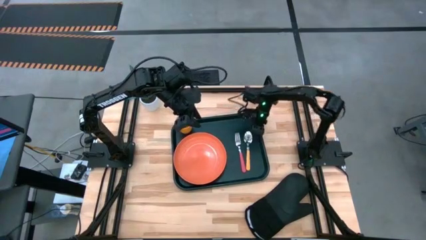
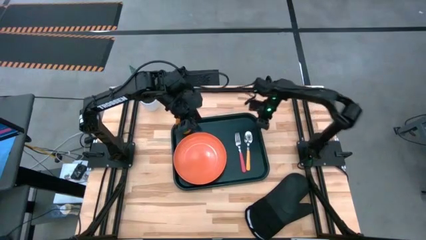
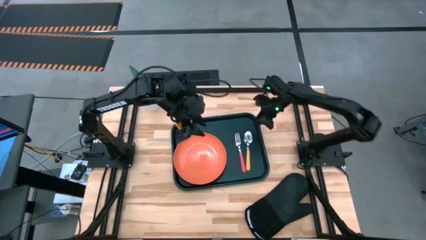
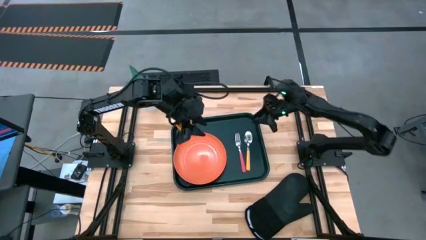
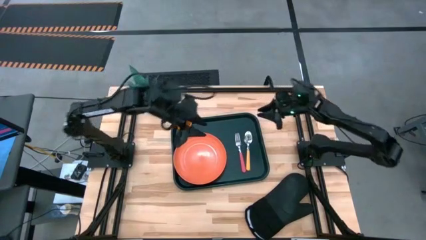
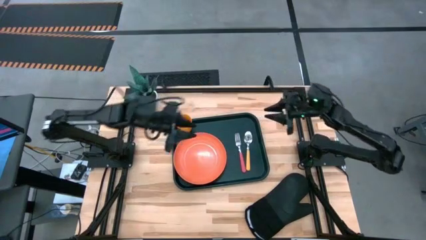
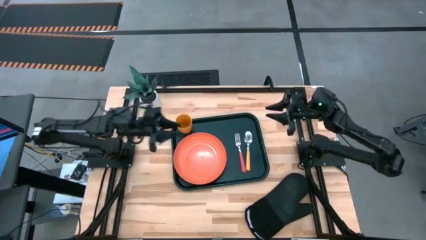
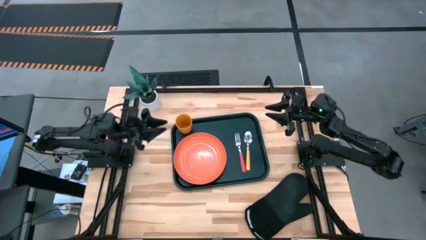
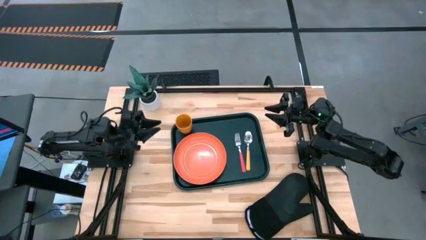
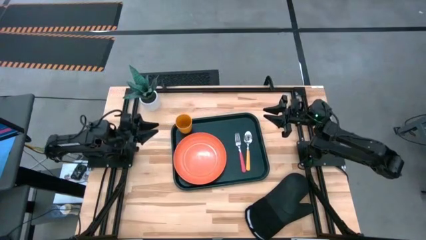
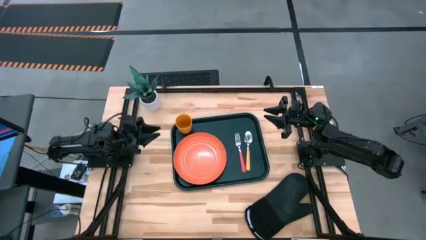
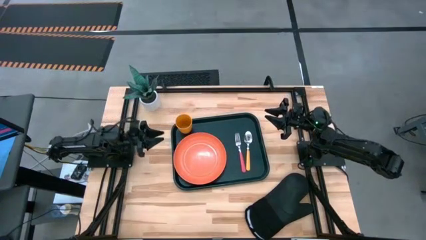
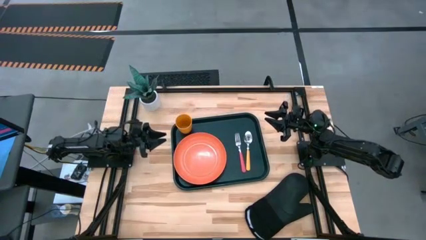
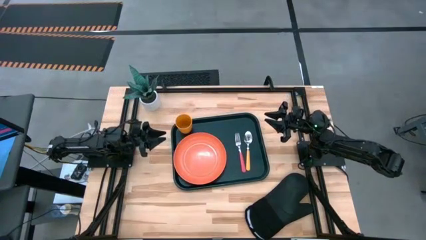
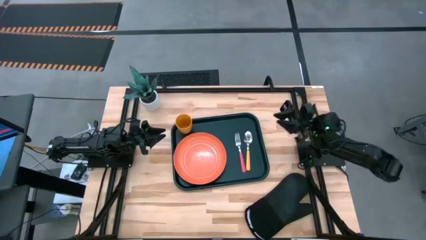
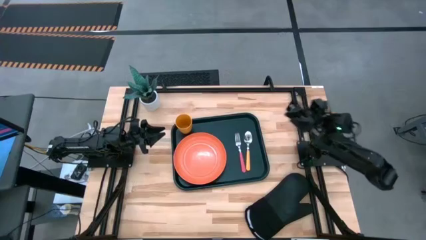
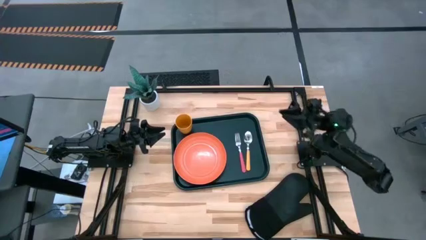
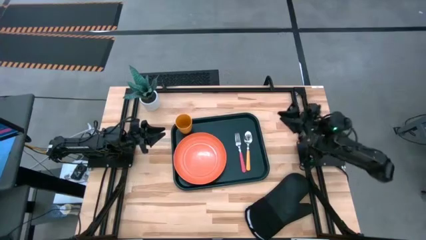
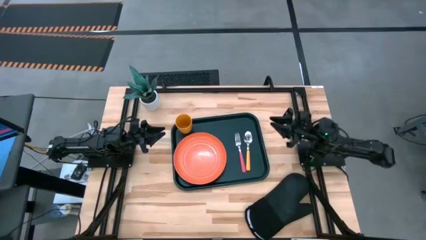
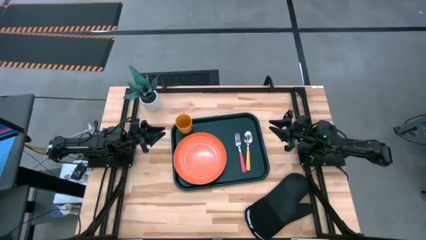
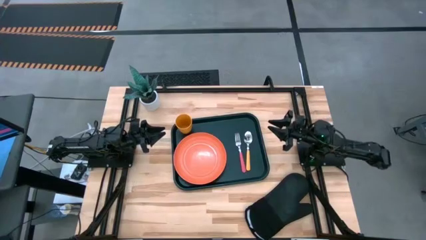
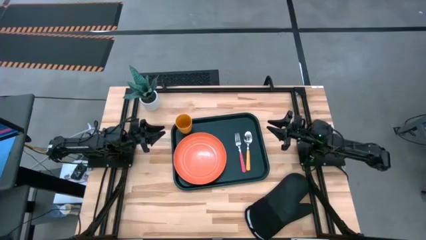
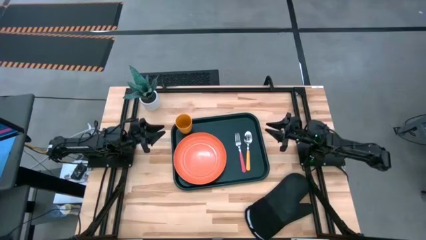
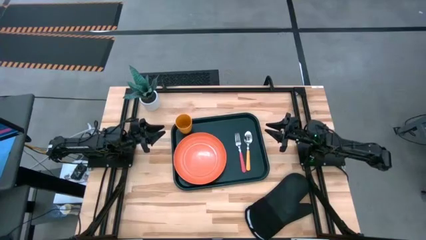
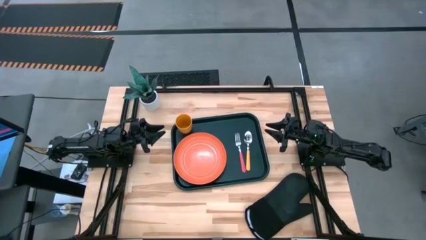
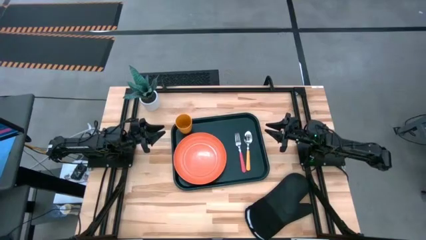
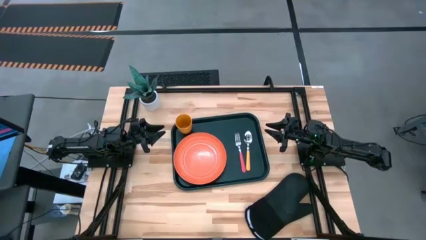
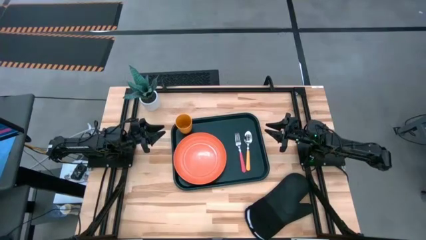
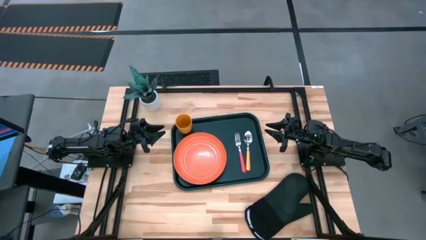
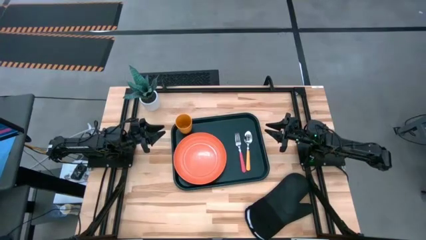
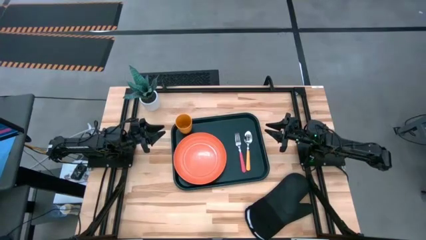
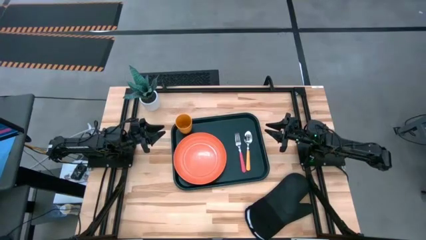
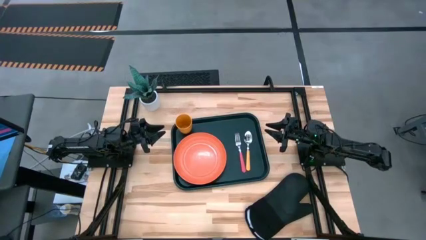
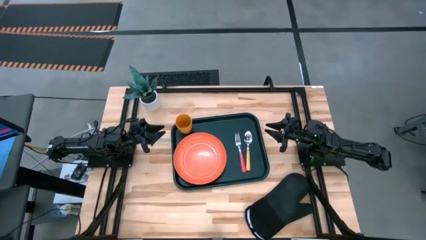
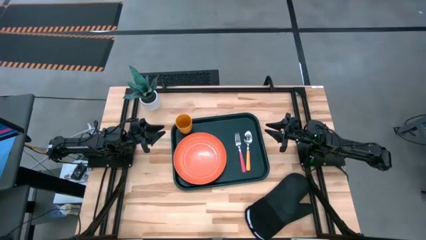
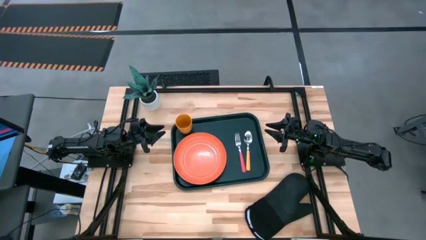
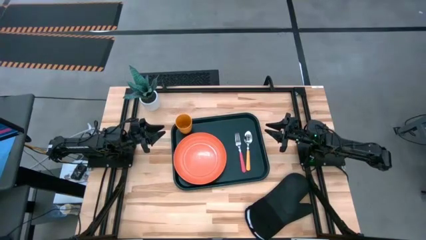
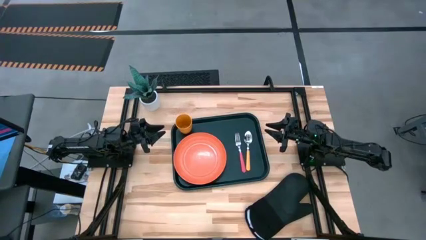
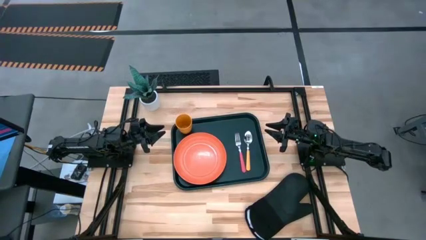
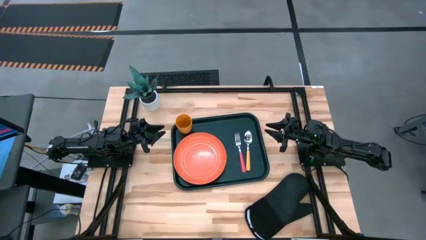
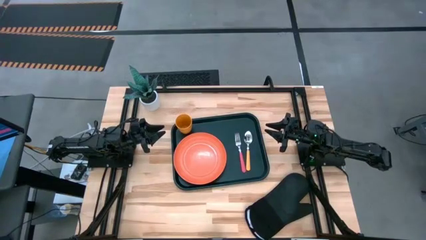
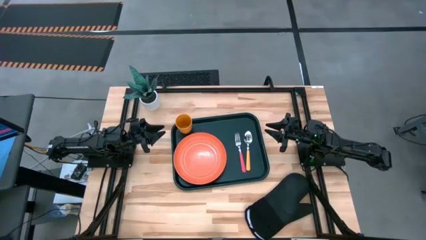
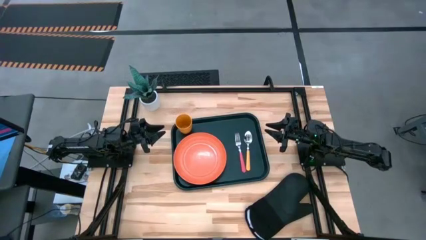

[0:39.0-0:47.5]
Task: Pick and place plate/cup/fork/spoon on tray
Return to Home Position

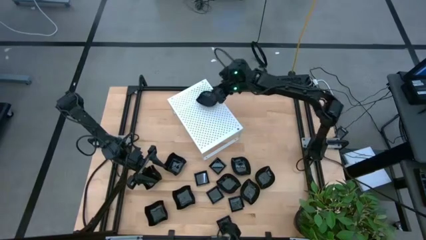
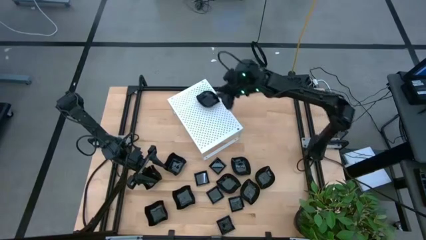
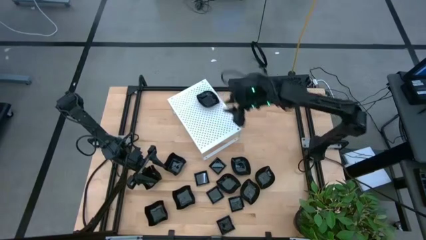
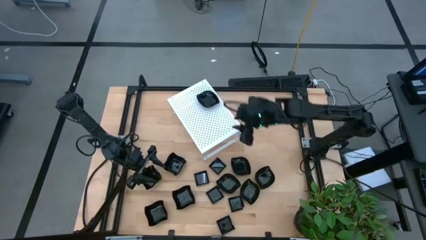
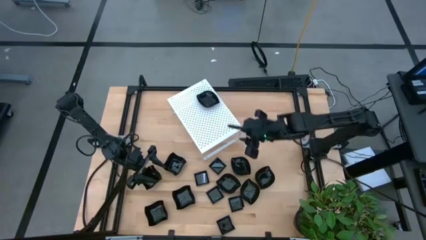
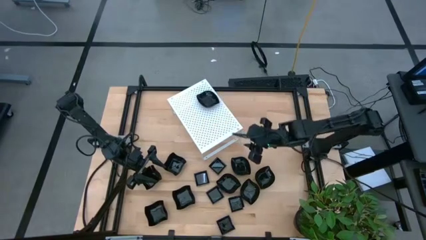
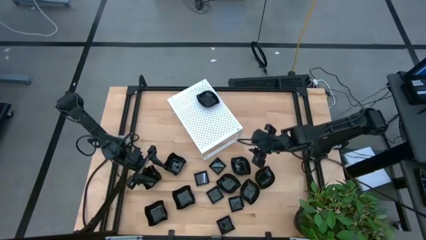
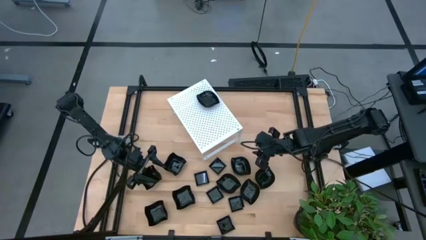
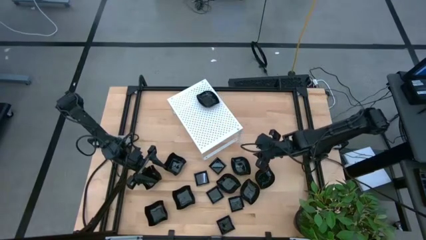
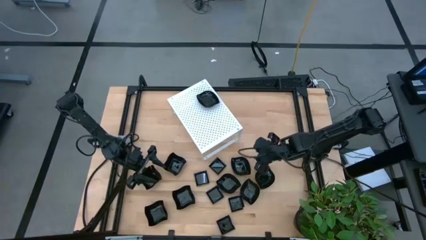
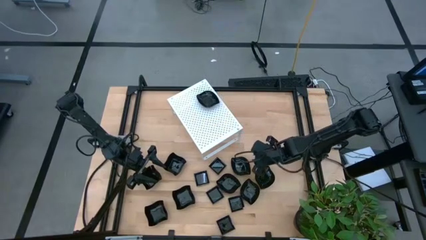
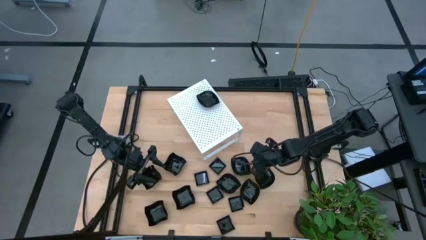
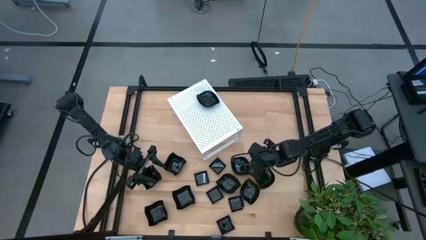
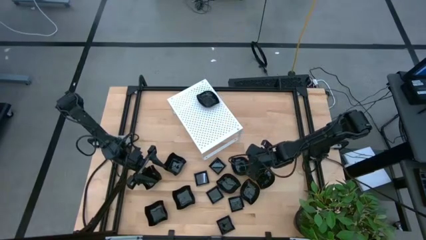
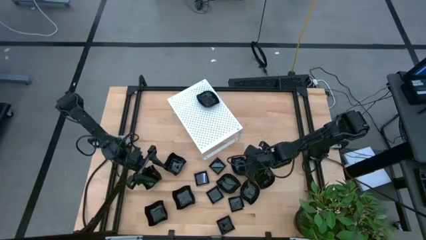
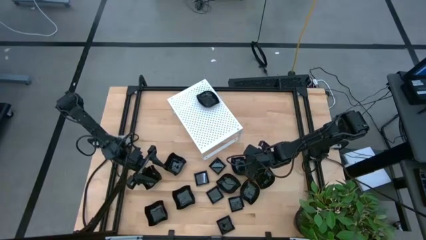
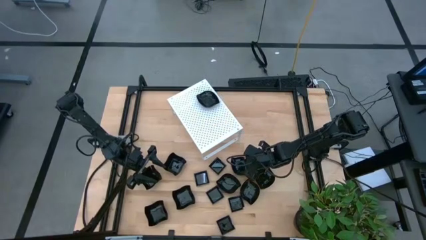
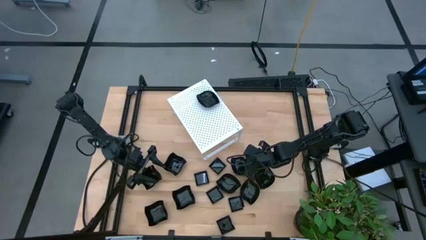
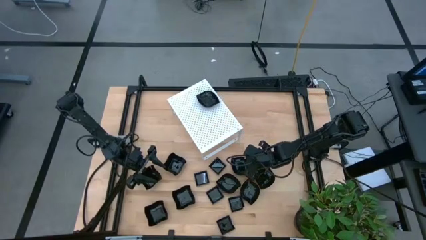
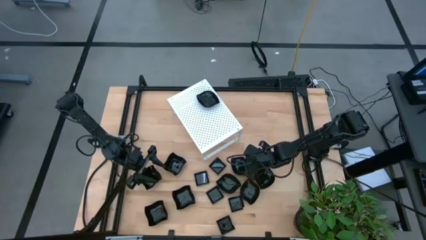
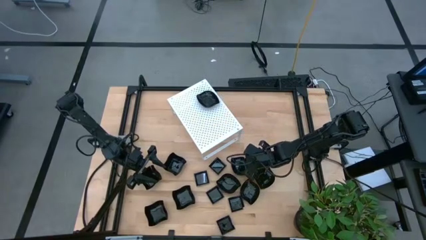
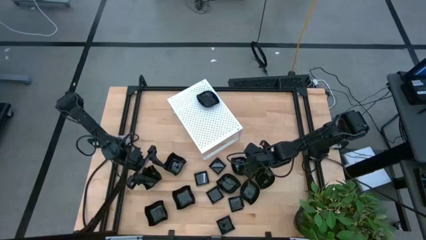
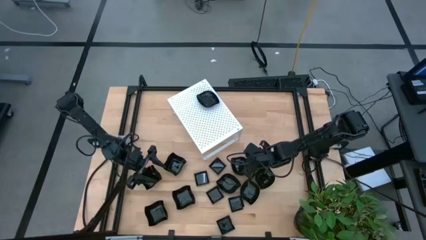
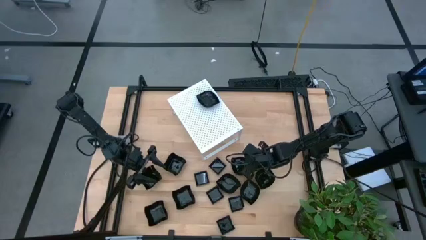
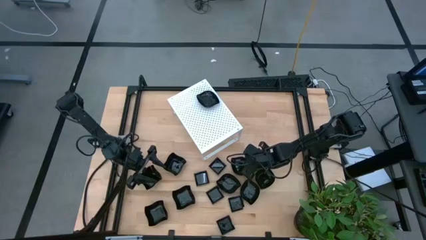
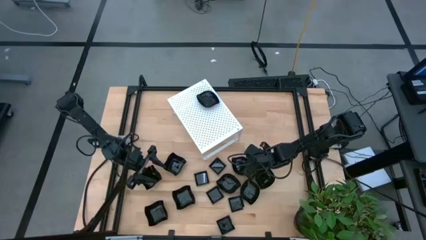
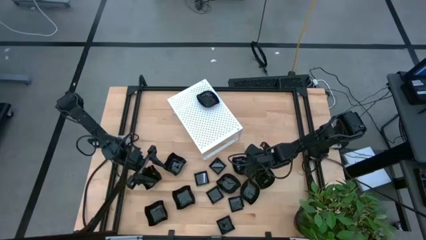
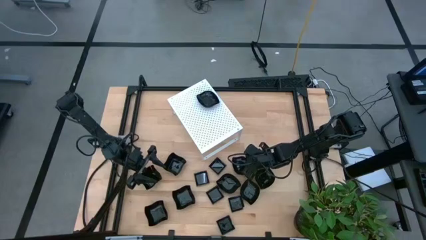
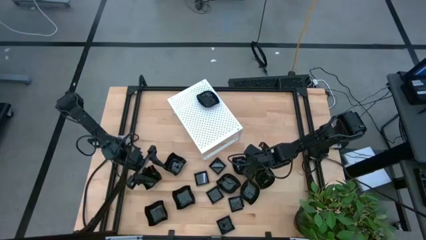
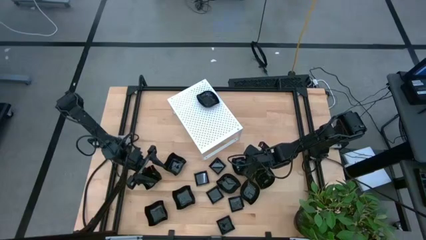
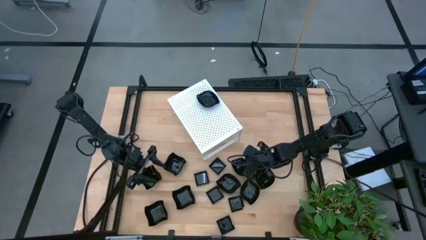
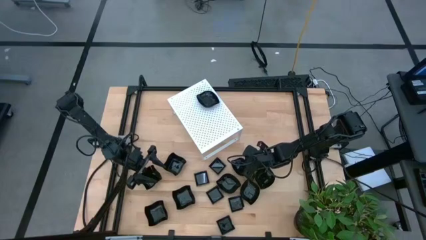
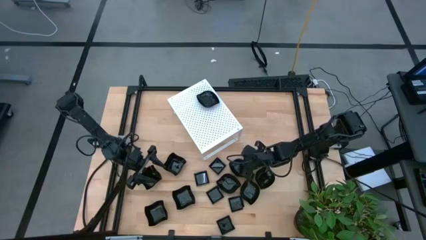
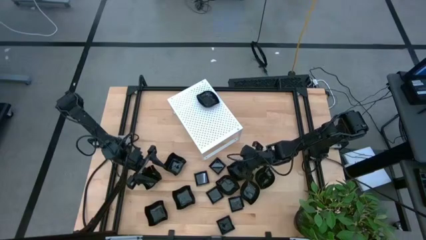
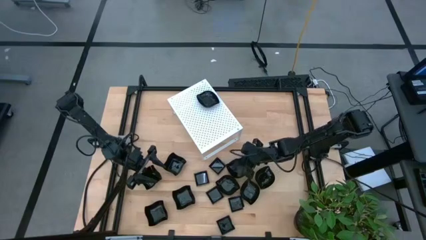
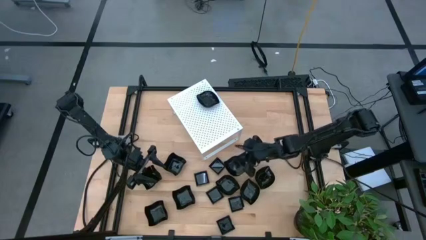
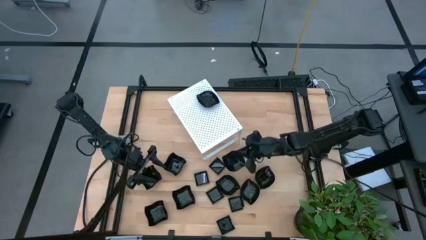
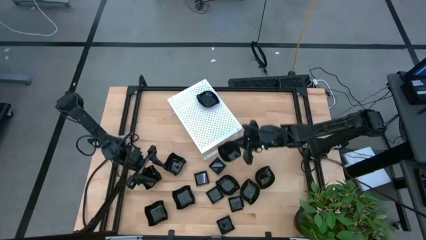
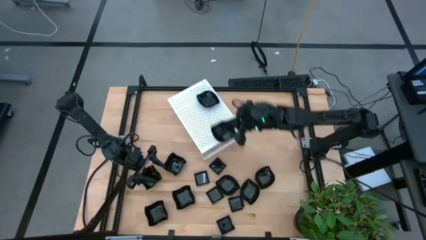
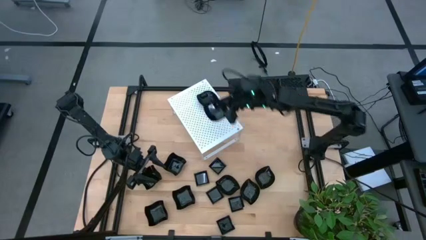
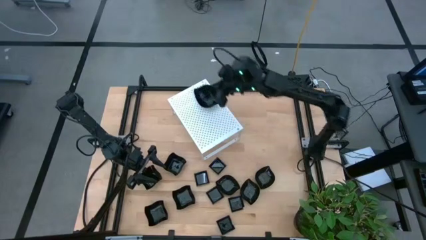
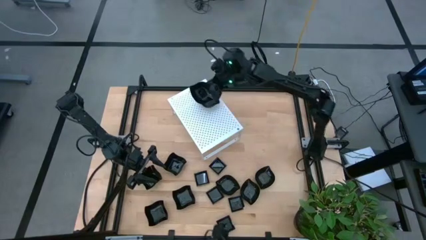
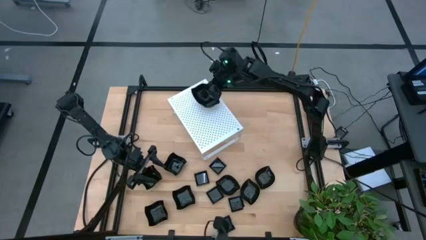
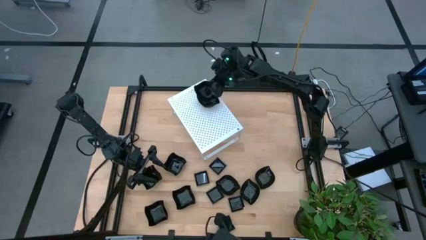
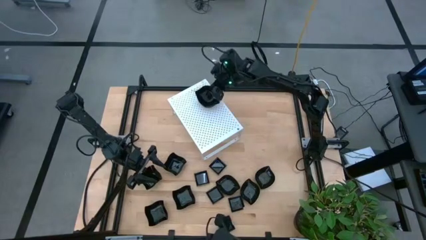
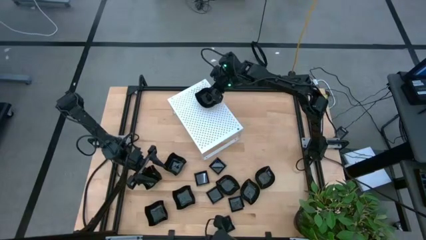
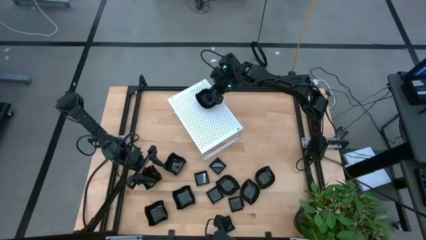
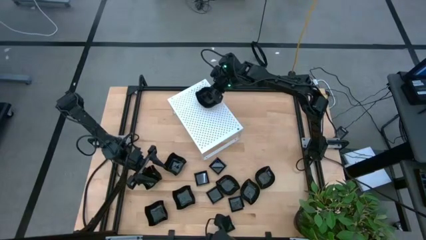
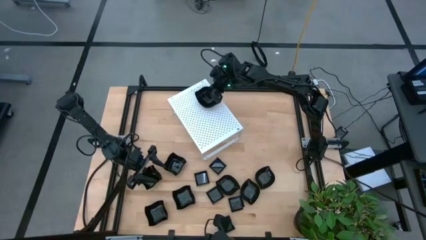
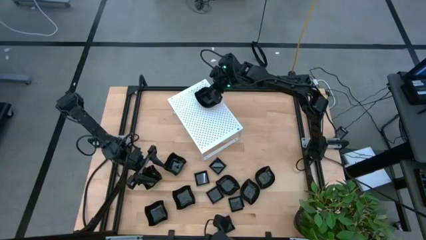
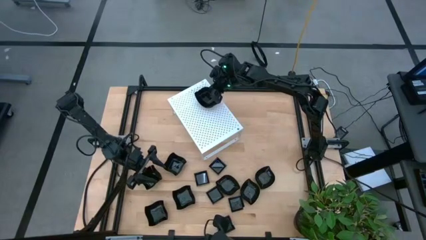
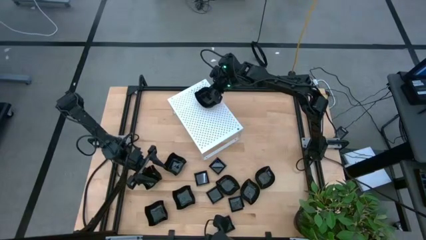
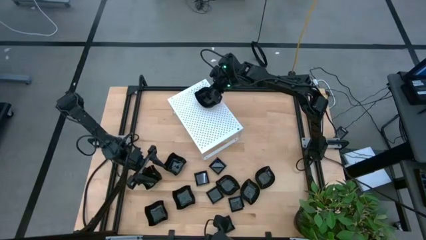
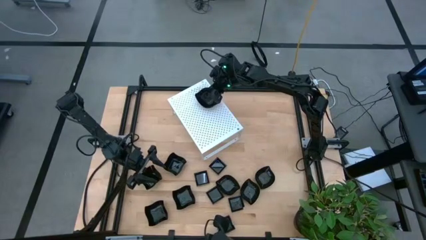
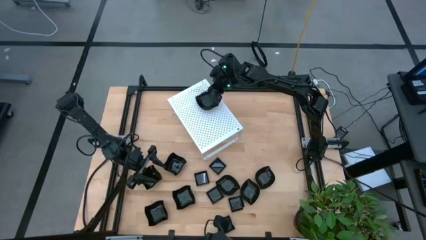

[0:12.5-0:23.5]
Task: Pick & Place Mini shaped plates
Stack the leaf-shaped plate on top of the other leaf-shaped plate on the shelf
